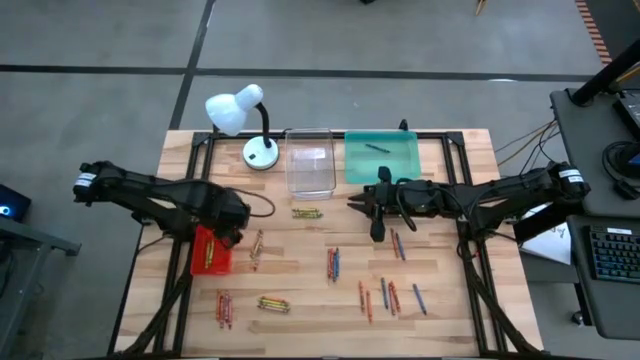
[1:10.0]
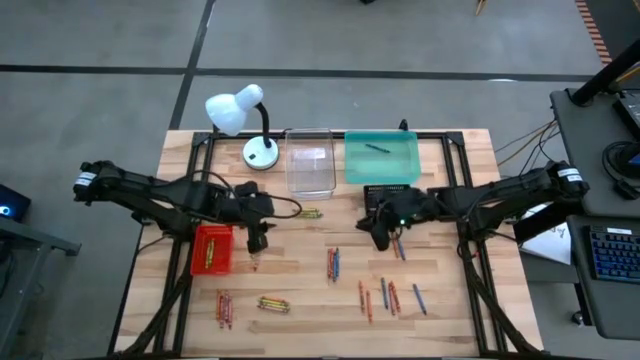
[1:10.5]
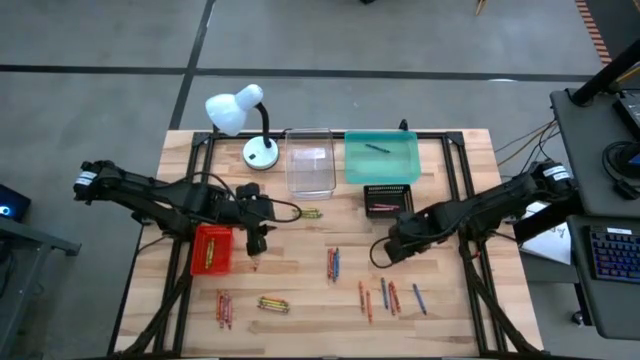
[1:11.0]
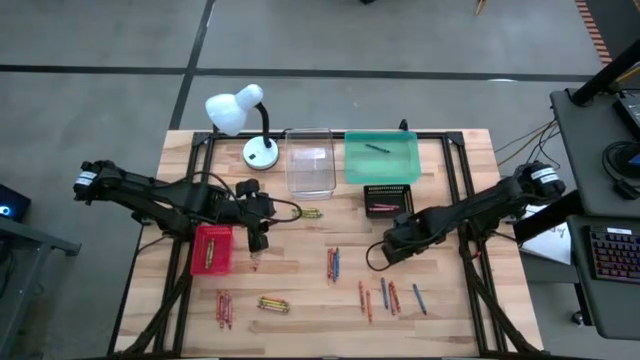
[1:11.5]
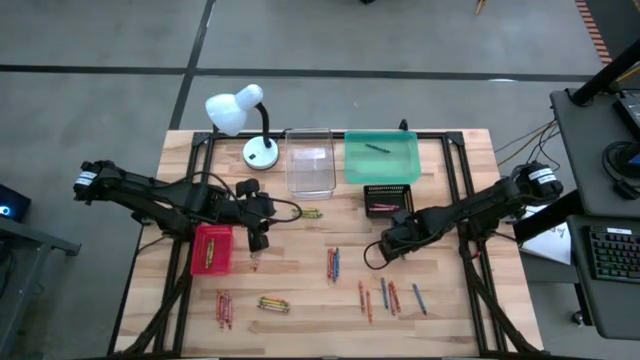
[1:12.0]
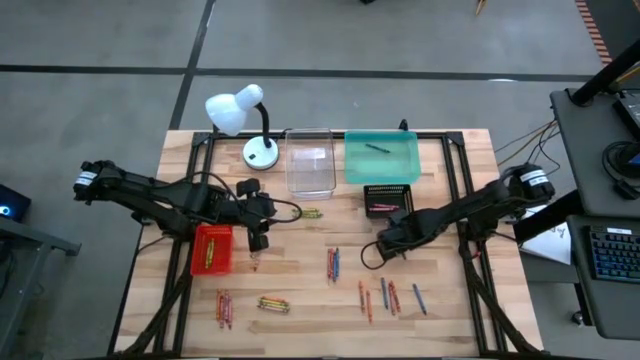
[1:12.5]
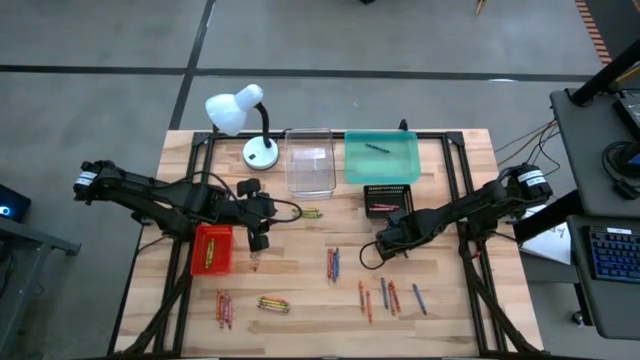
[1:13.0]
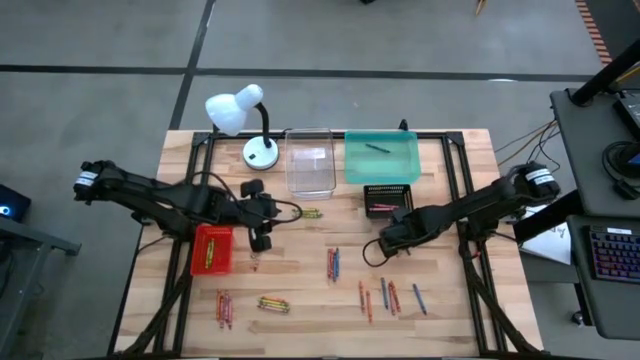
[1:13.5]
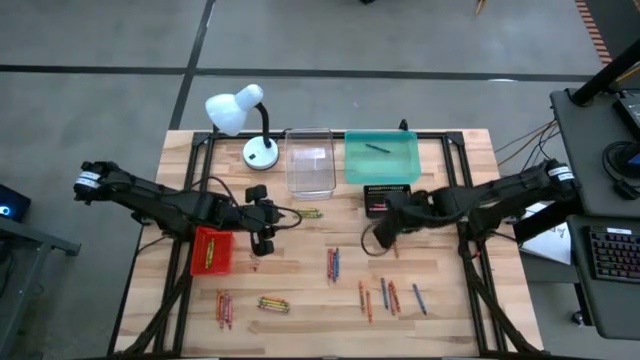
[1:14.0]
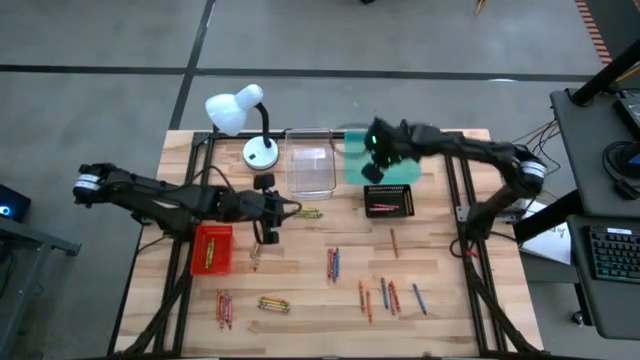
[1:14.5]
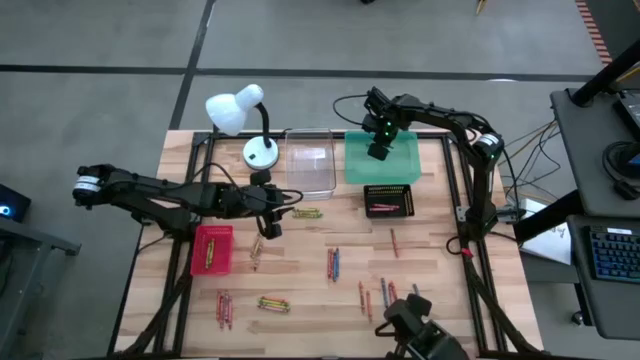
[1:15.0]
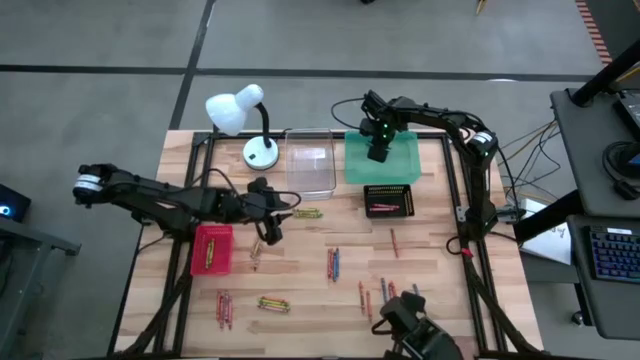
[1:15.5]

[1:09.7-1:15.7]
Task: Sort crayons
Put the blue crayon into the blue bin

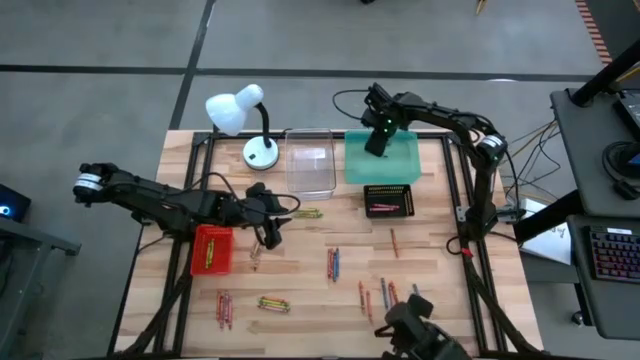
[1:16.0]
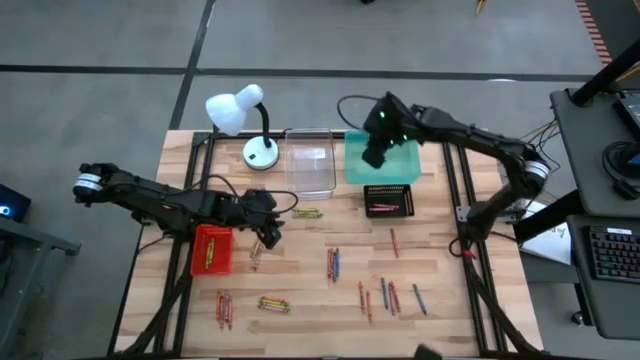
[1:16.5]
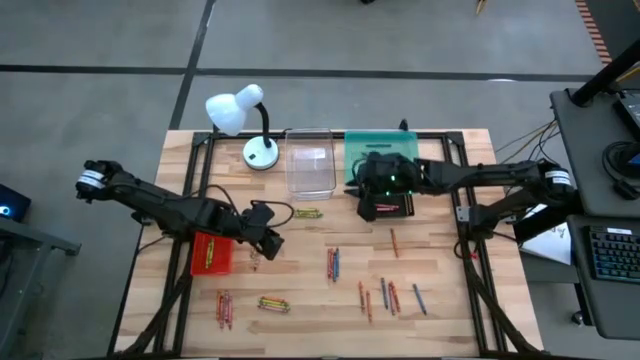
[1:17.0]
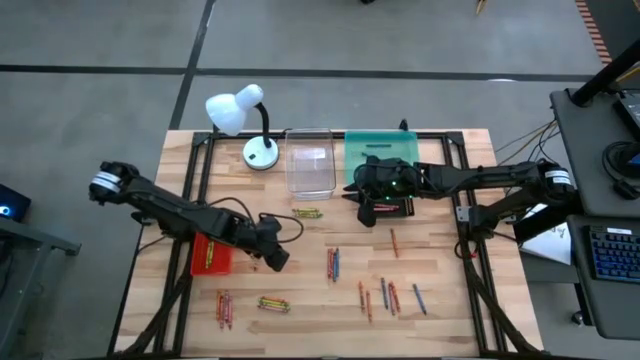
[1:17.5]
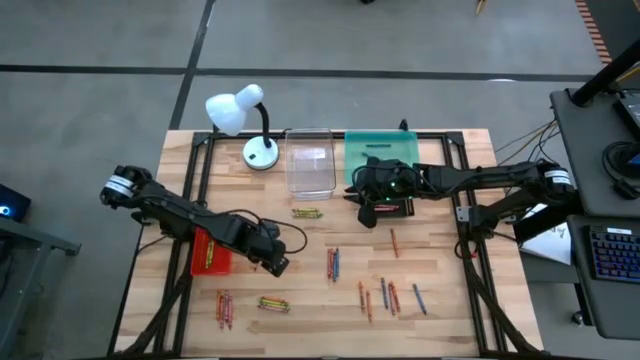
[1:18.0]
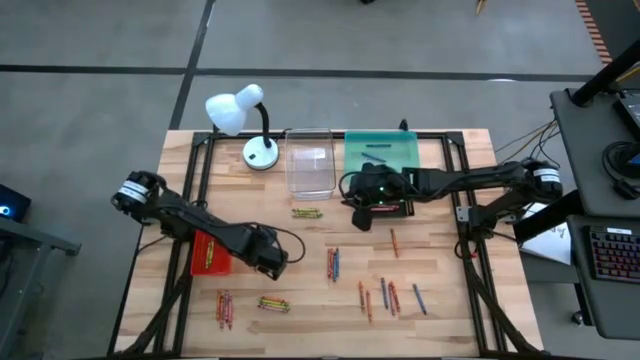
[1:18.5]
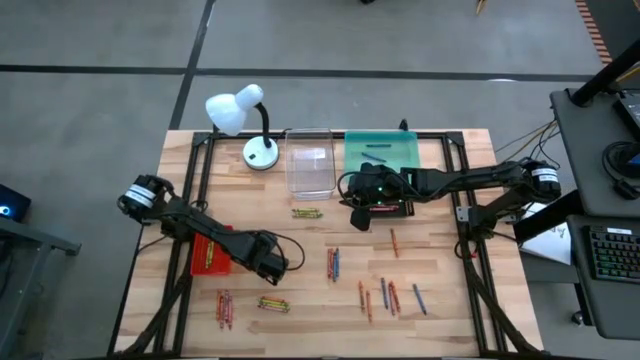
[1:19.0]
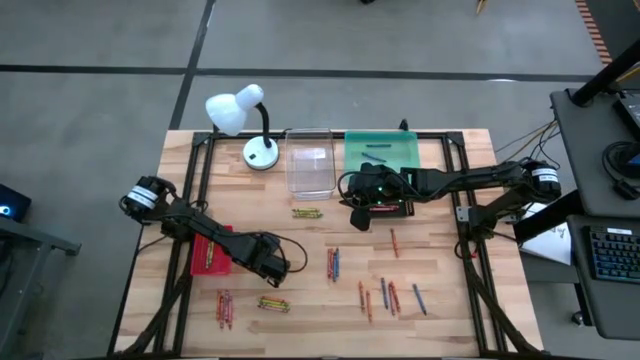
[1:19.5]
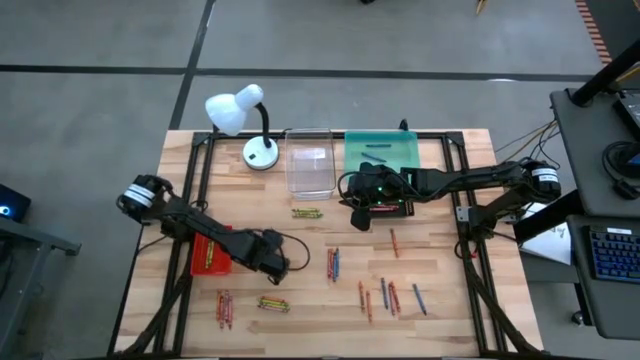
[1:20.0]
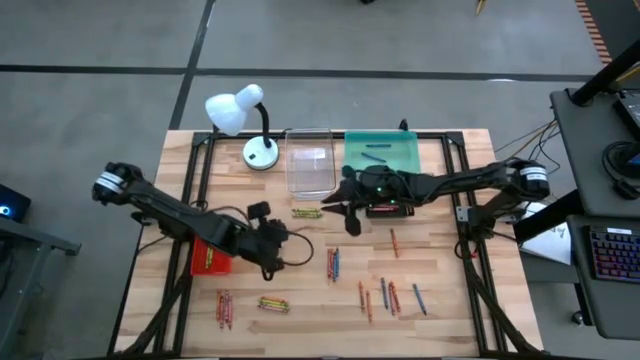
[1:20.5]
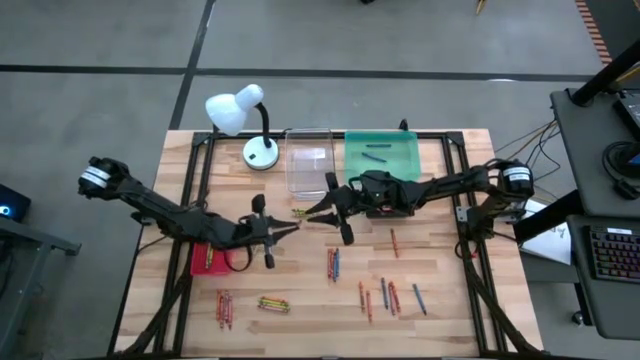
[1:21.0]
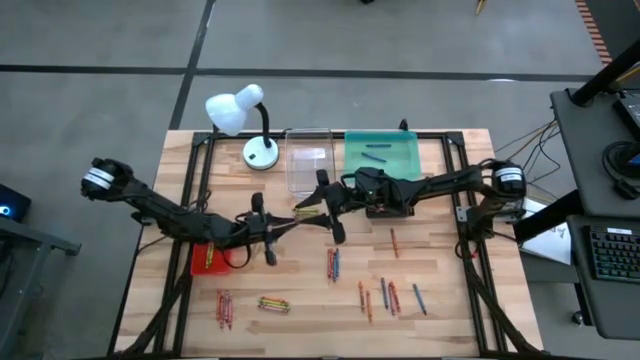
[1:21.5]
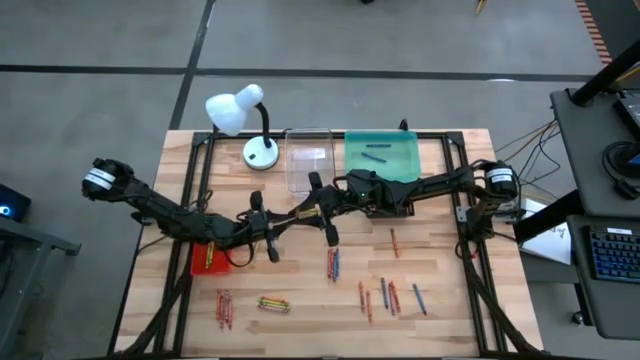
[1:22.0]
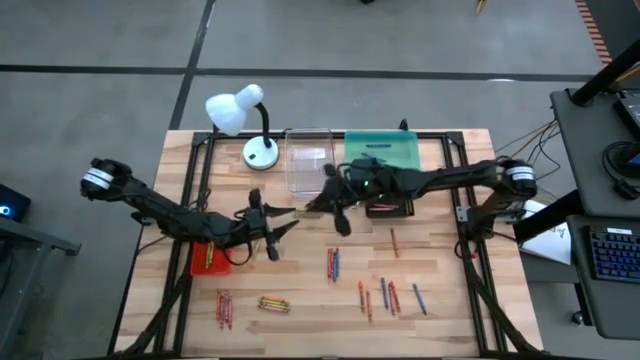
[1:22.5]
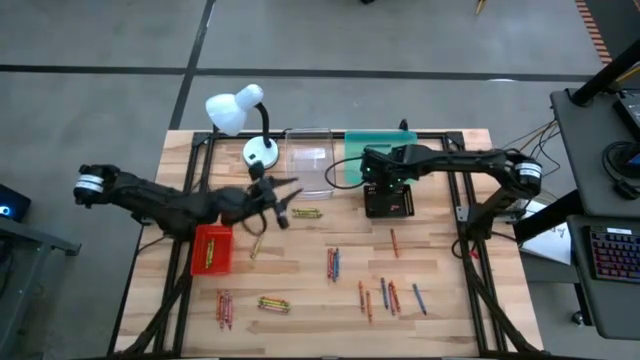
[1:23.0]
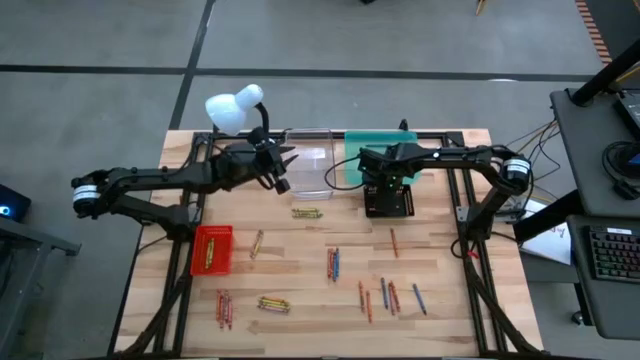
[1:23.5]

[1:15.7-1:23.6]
Put the red crayon into the black bin

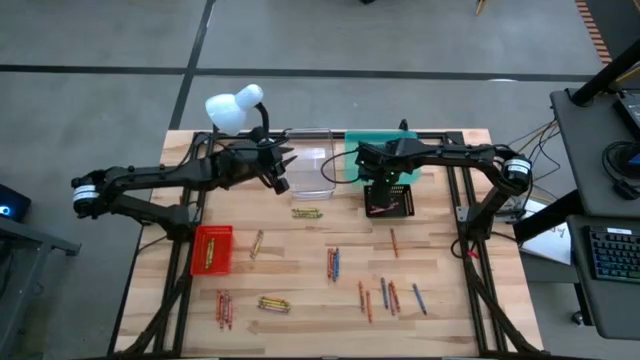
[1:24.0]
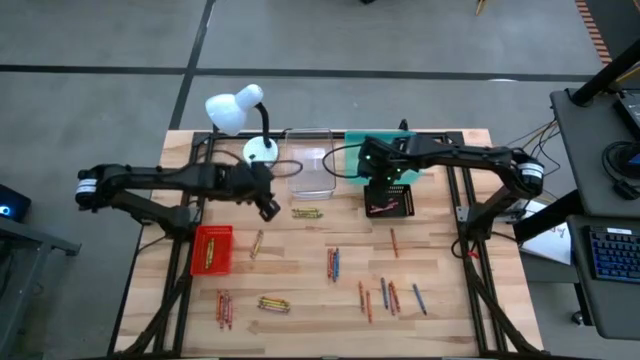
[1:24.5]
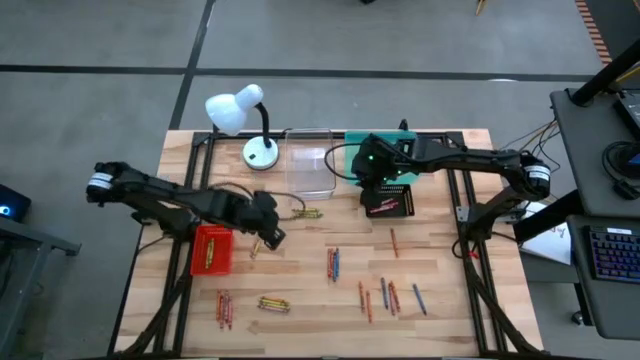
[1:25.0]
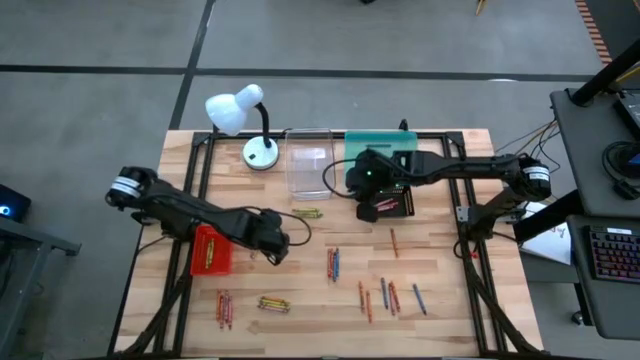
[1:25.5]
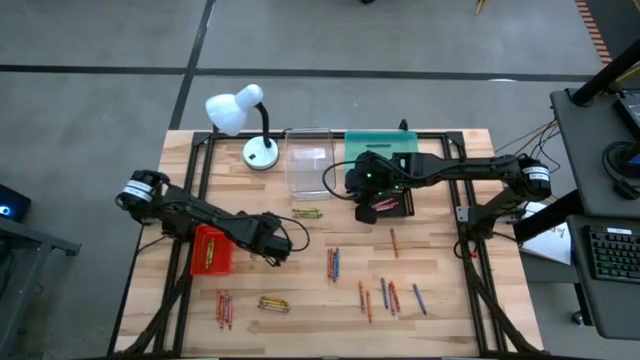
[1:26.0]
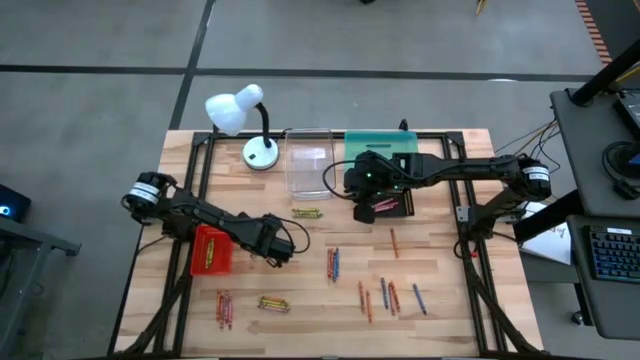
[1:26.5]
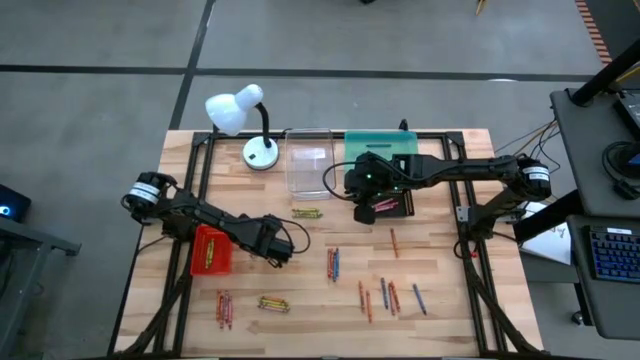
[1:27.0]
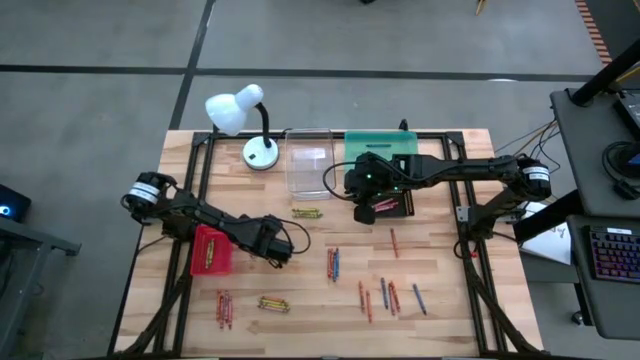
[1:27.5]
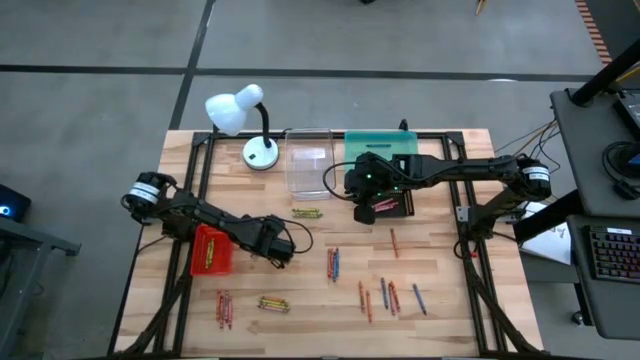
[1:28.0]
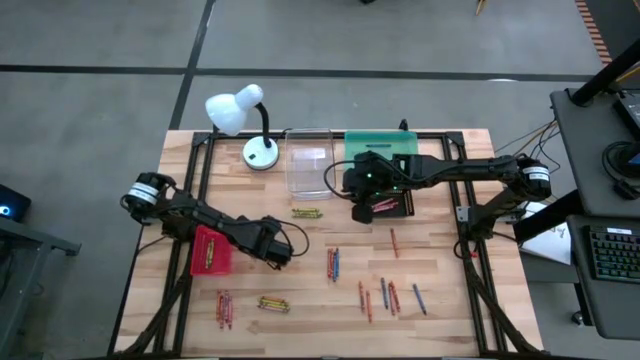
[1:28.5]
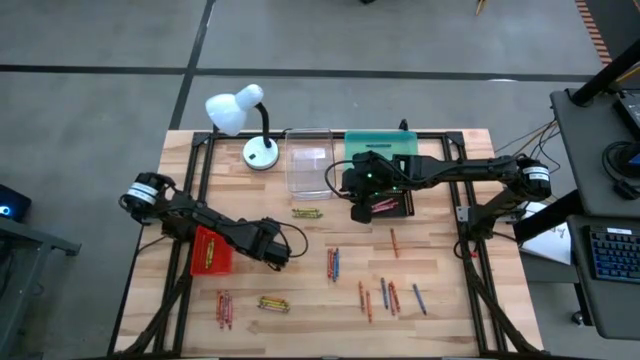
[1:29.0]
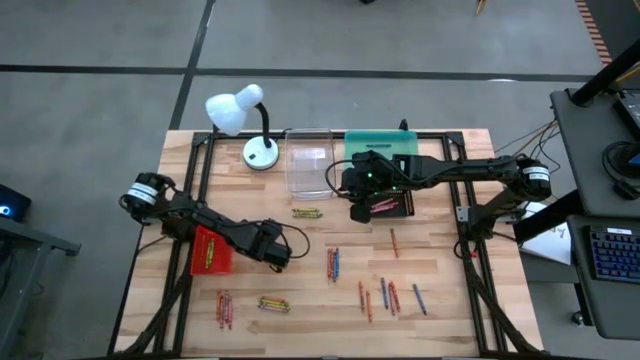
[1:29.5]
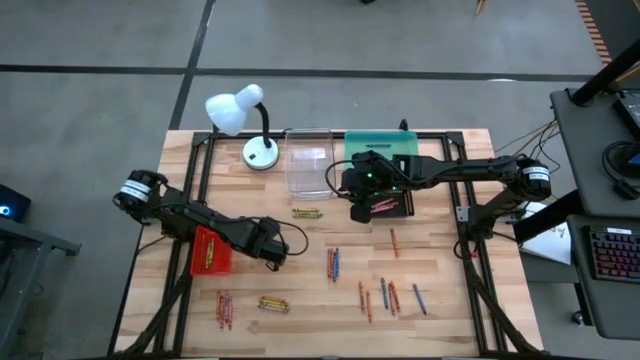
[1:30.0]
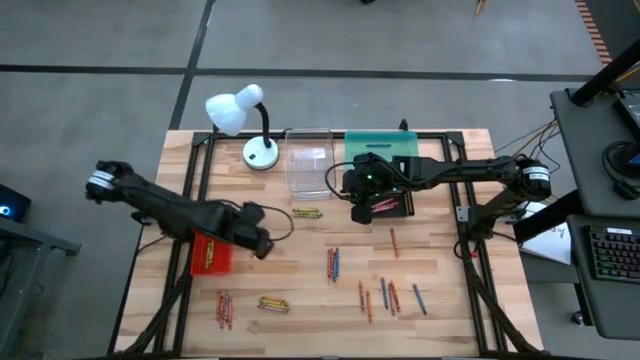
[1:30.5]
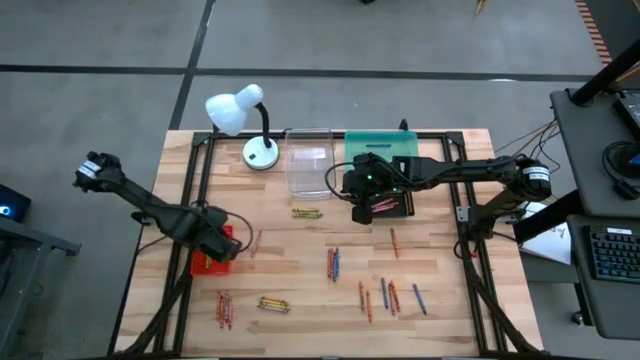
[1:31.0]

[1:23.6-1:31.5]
Put the green crayon into the orange bin
